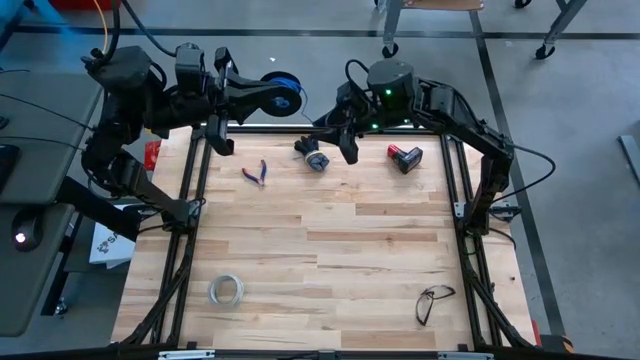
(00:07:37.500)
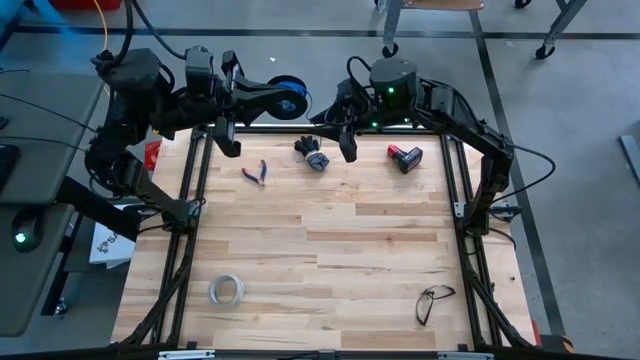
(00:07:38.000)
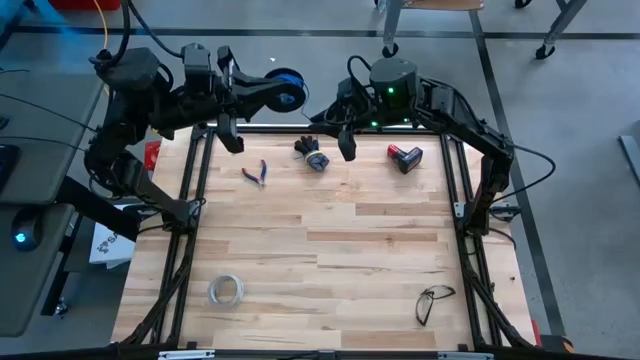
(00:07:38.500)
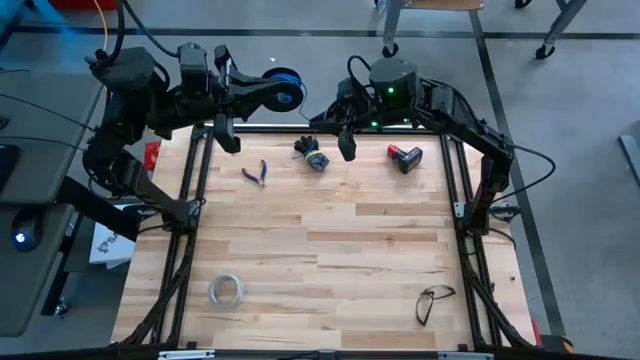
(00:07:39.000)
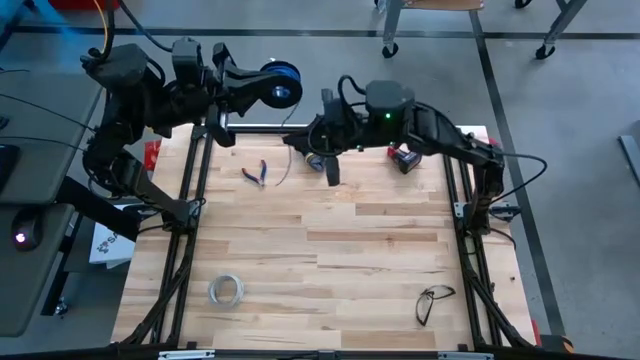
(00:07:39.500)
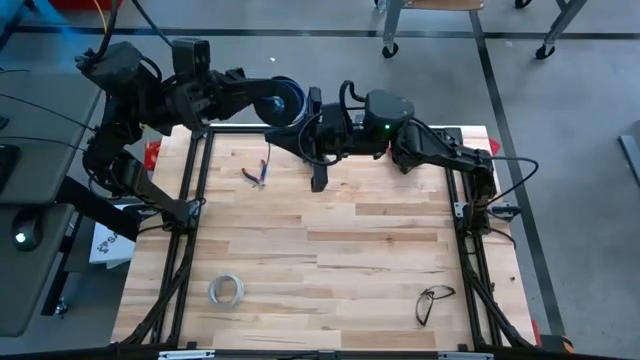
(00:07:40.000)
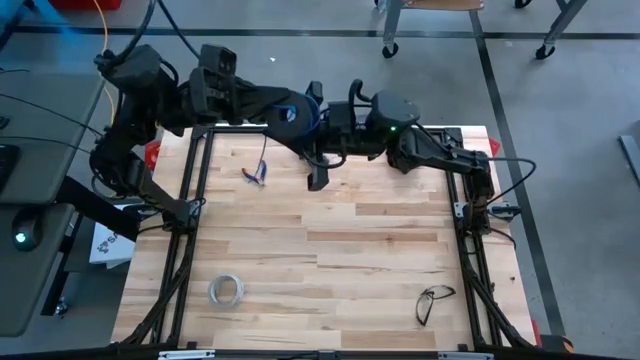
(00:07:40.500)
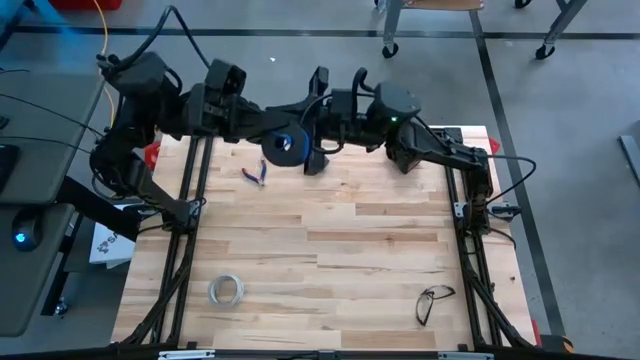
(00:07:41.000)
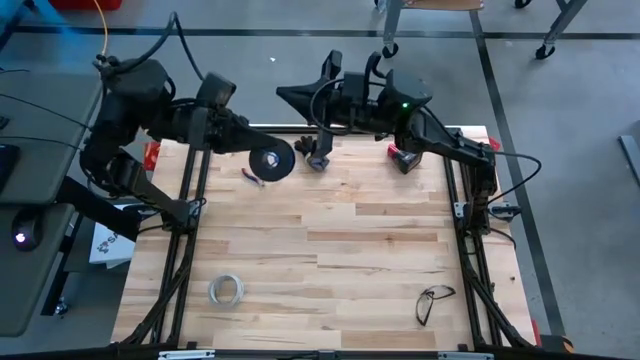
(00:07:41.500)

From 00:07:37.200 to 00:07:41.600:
Task: Coil cords
Coil the blue wire onto the black spool

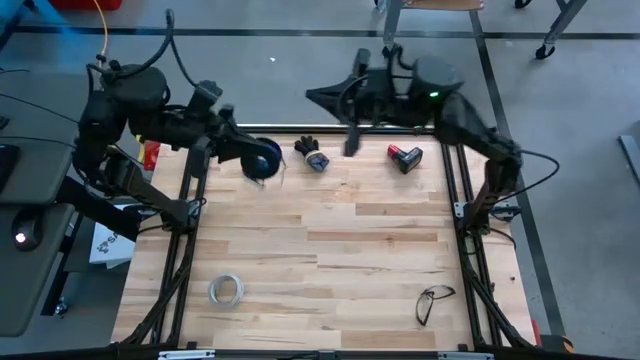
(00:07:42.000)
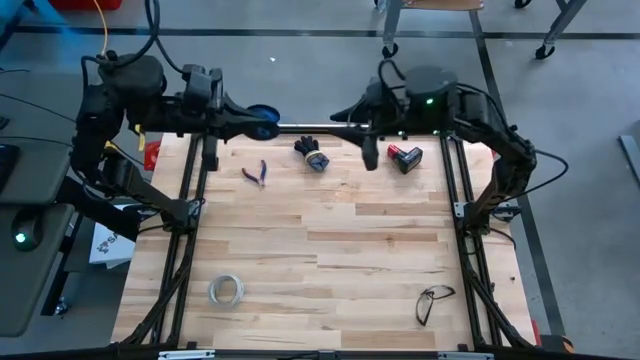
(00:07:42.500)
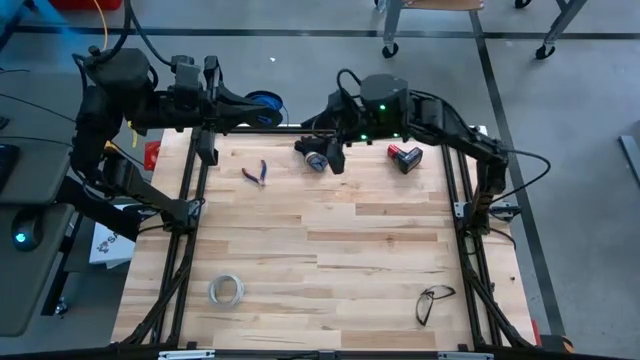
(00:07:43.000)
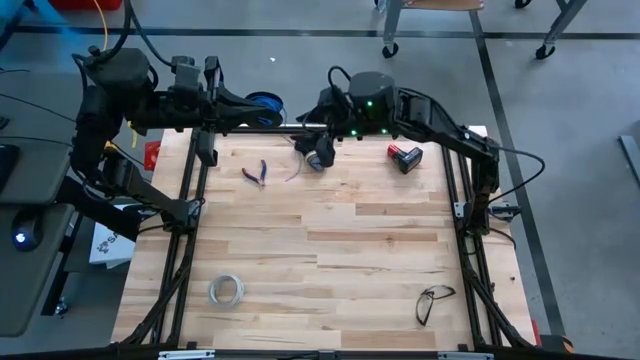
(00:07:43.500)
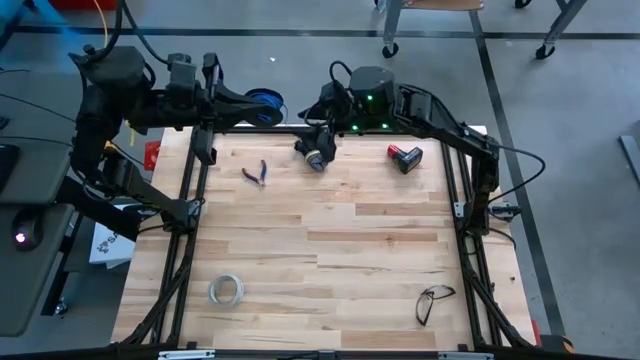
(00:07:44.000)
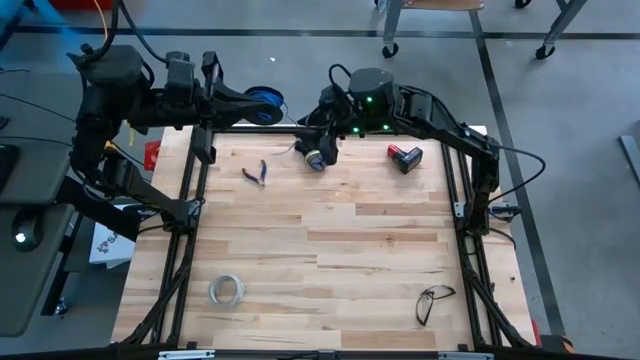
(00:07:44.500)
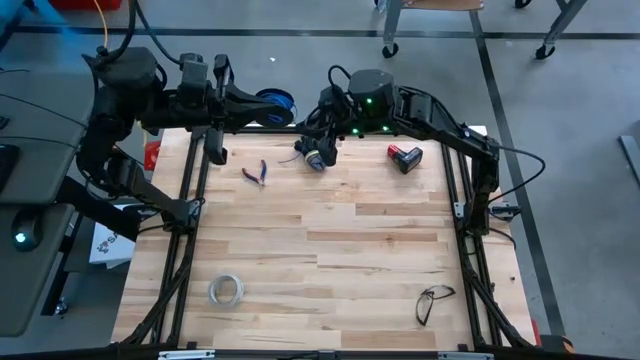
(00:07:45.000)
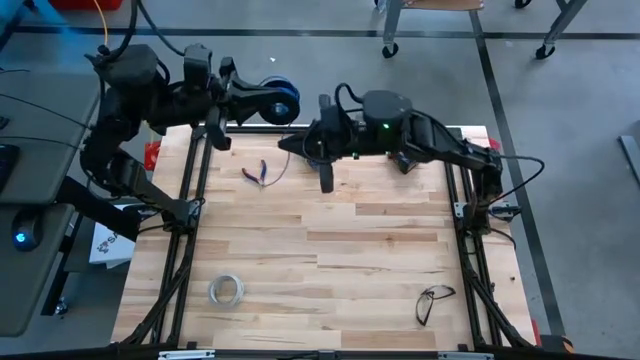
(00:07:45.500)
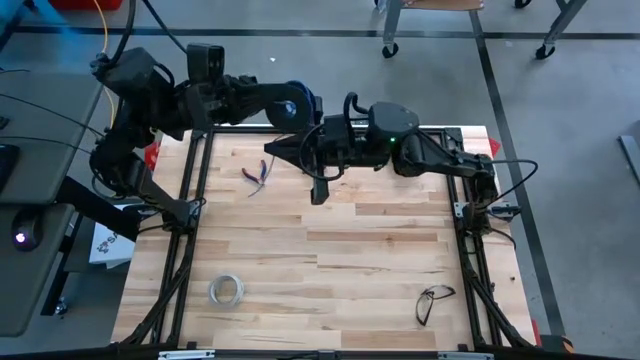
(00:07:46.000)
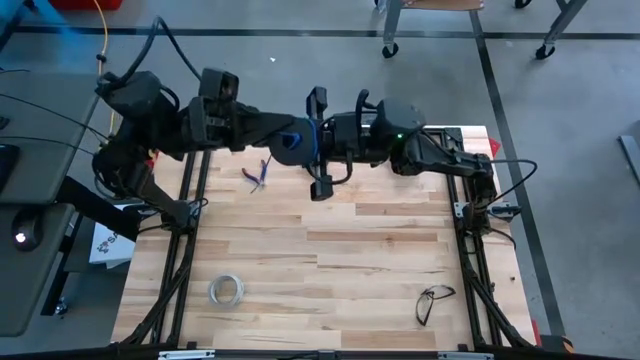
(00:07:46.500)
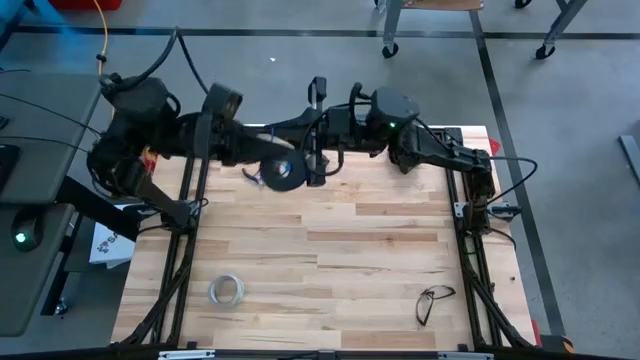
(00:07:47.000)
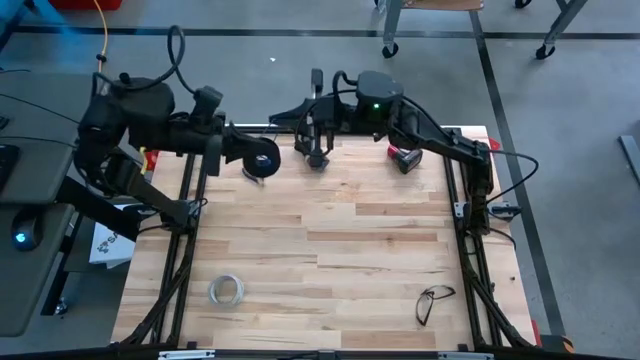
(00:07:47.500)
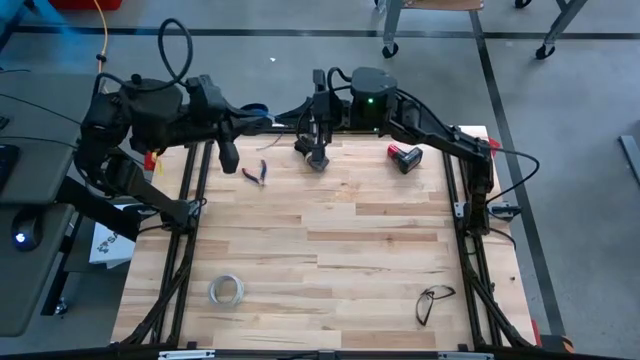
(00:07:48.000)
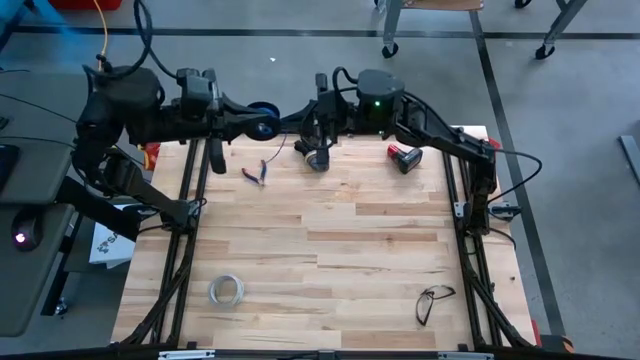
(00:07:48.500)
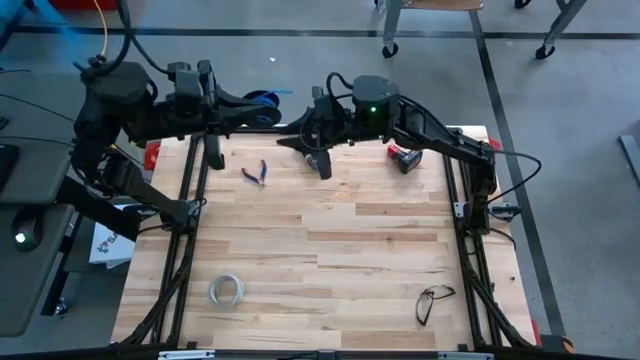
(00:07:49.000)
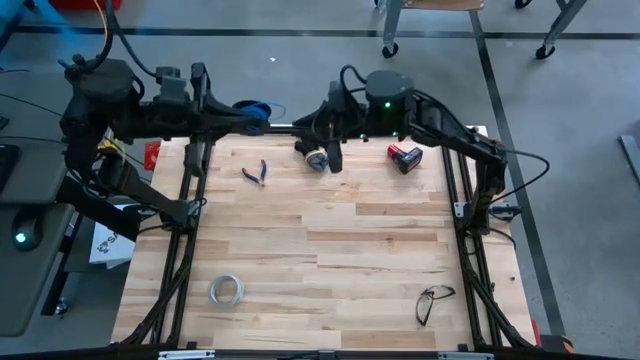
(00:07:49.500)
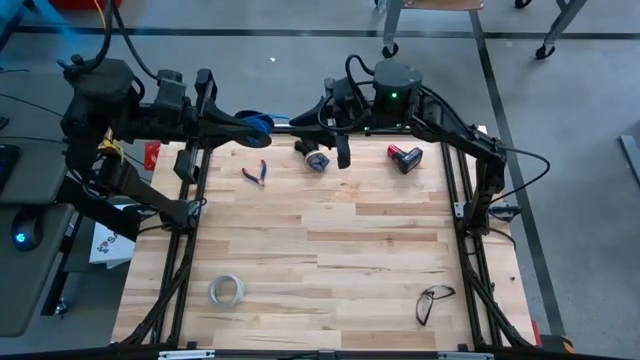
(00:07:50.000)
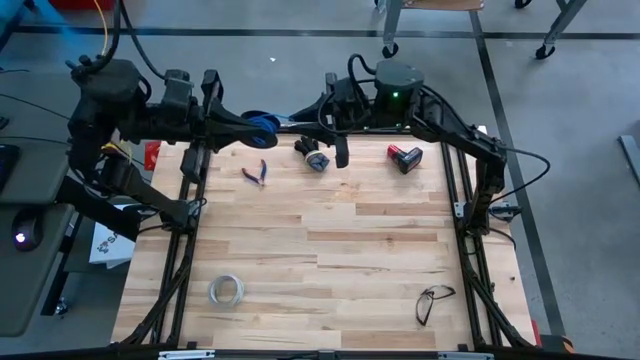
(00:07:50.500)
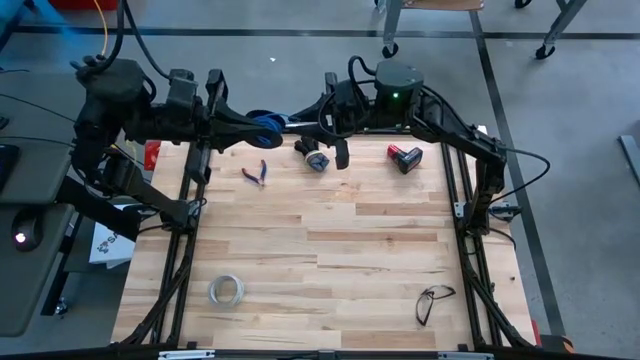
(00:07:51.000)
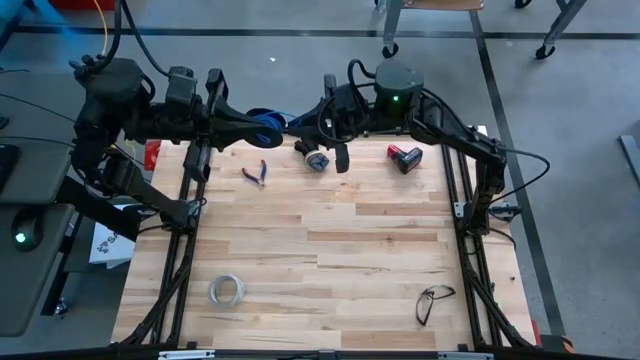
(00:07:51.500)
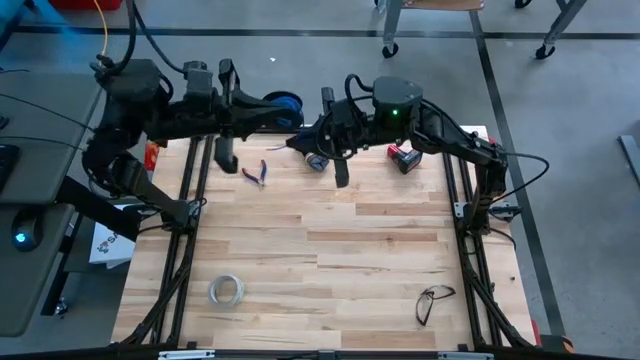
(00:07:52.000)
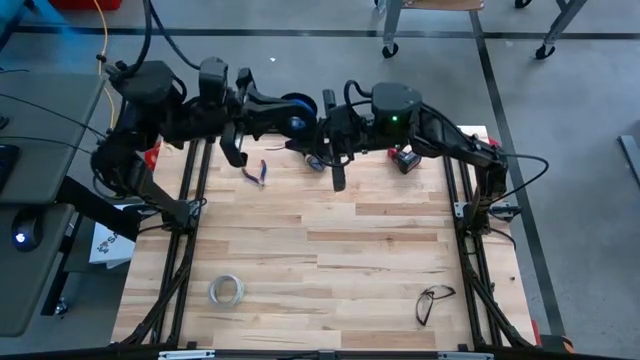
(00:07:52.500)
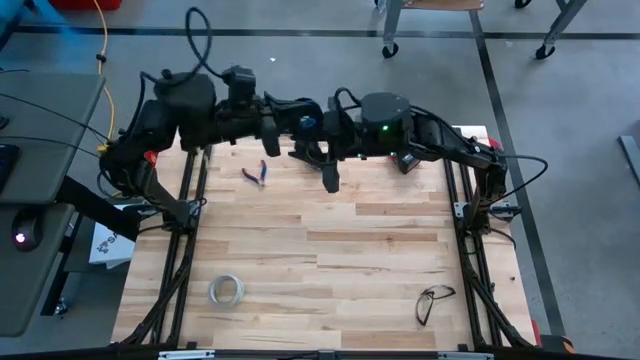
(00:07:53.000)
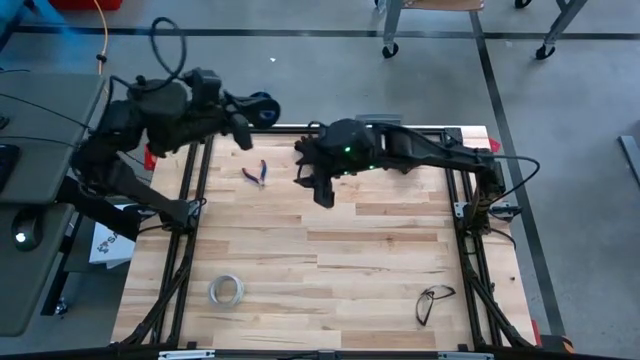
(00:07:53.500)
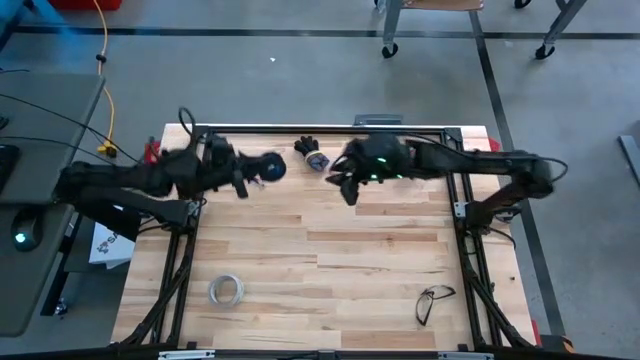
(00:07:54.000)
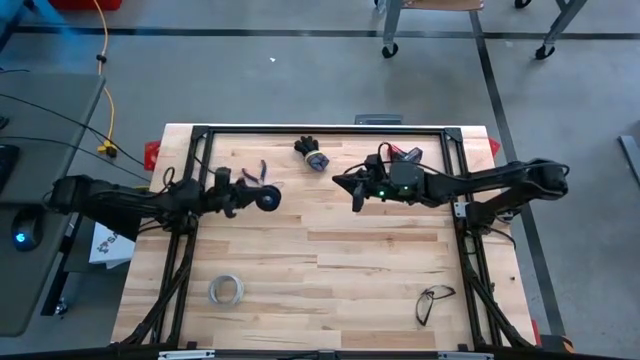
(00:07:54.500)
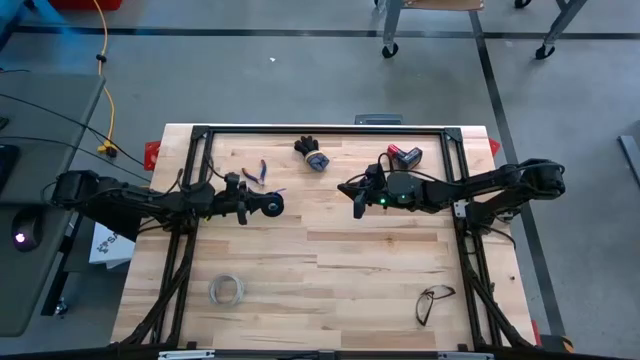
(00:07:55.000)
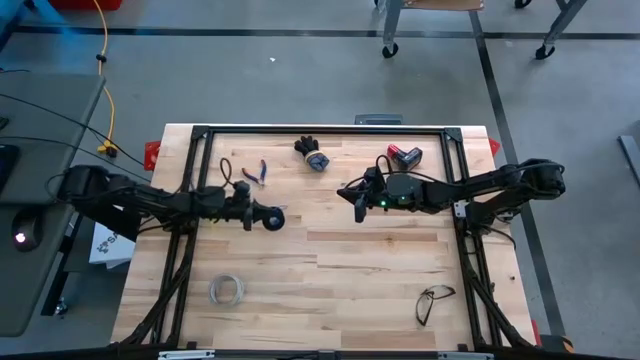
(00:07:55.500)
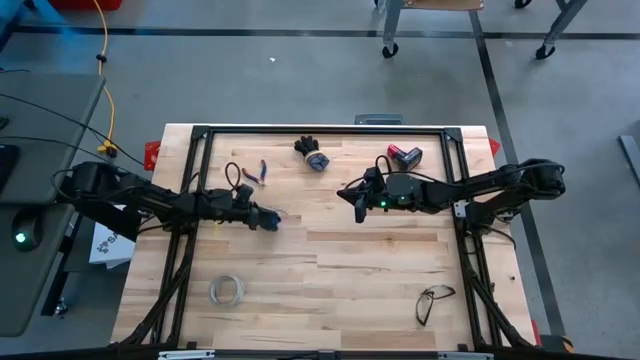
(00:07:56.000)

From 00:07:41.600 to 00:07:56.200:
Coil the blue wire onto the black spool

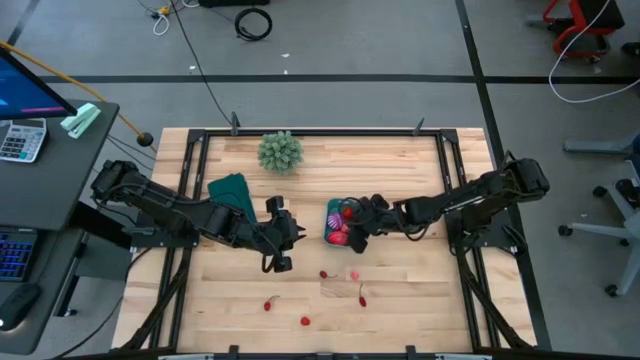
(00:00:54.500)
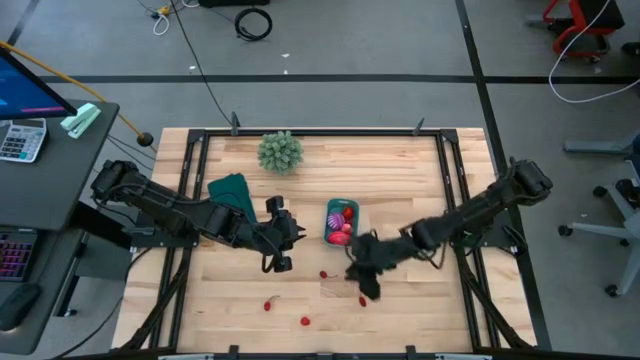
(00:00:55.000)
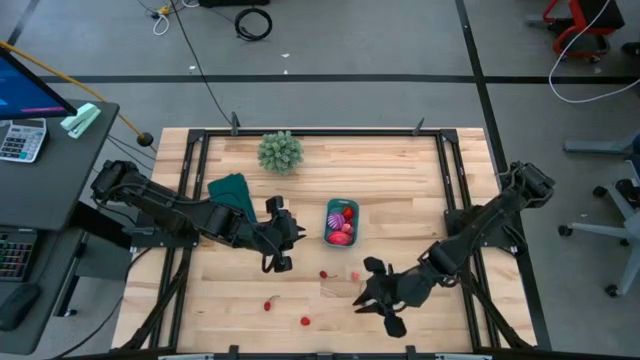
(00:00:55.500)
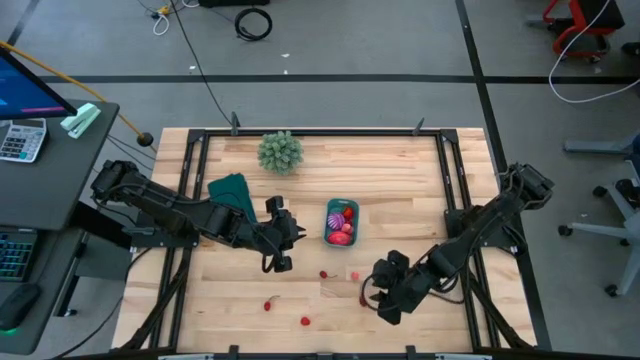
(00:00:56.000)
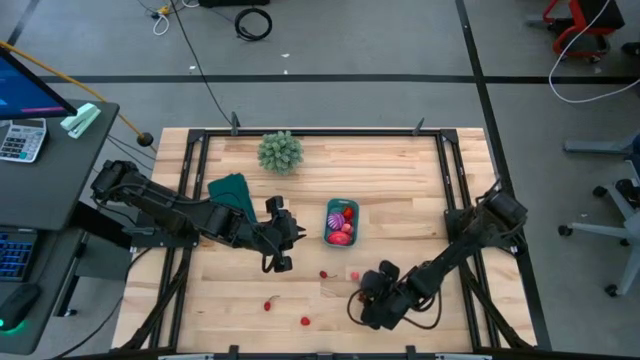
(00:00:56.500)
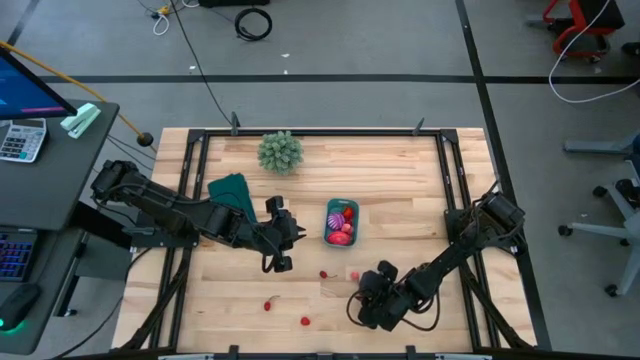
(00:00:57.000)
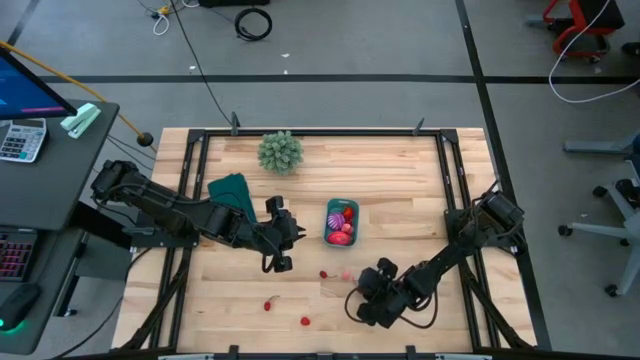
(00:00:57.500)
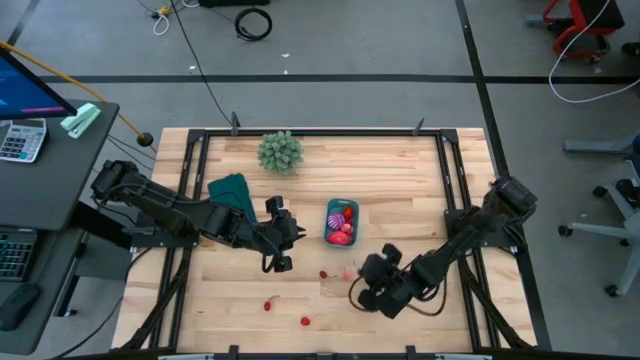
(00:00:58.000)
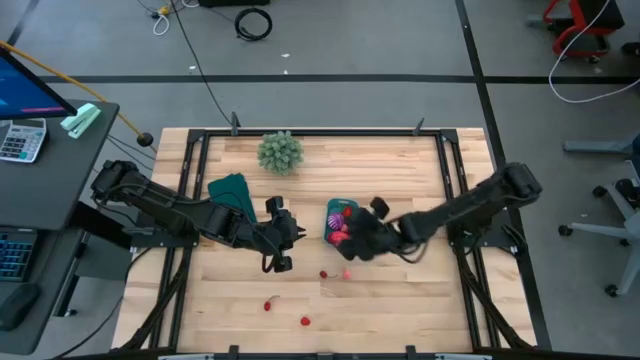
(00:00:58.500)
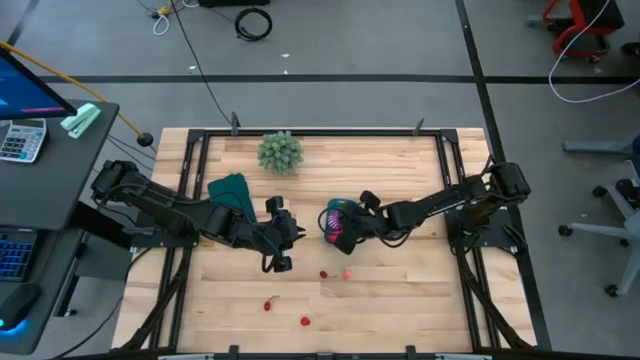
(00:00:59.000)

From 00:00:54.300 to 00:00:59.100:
Task: Pick and placing Produce into tupperware
Put the red cherry into the blue bin
